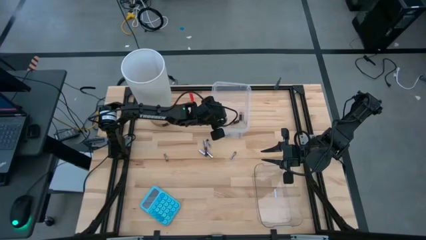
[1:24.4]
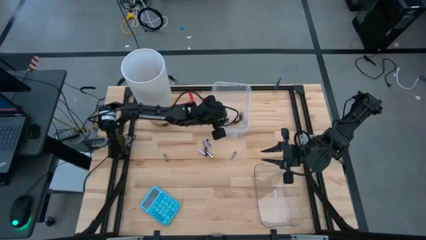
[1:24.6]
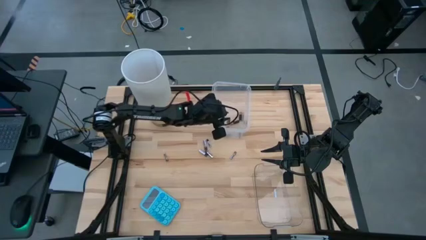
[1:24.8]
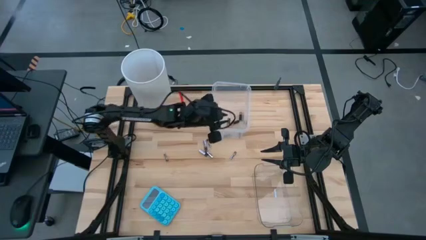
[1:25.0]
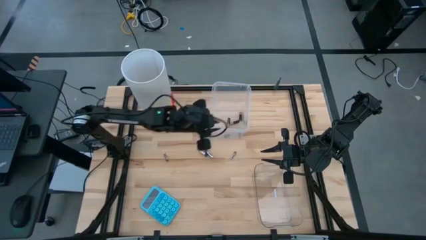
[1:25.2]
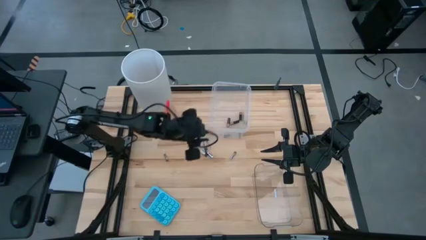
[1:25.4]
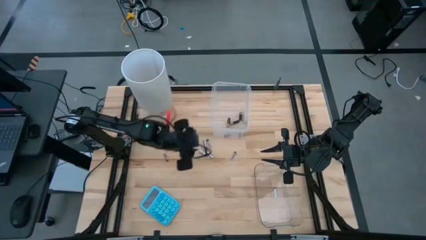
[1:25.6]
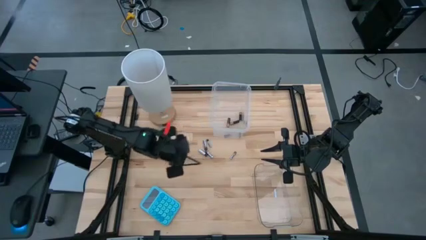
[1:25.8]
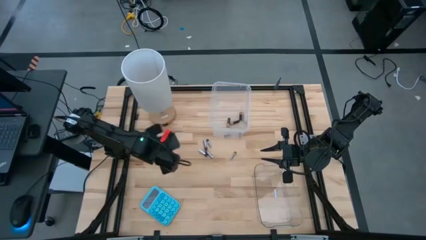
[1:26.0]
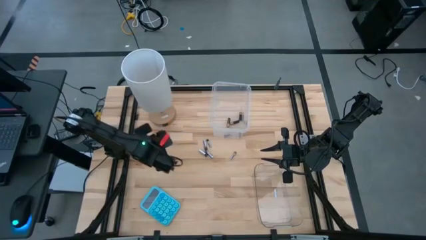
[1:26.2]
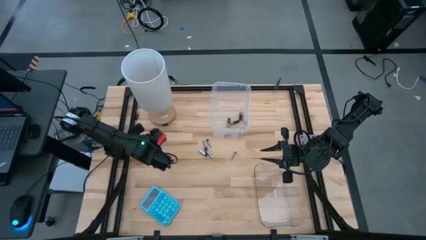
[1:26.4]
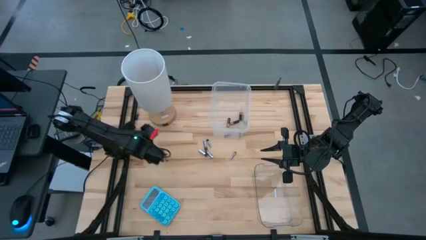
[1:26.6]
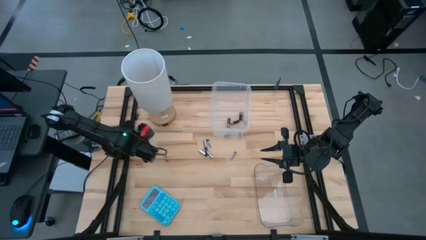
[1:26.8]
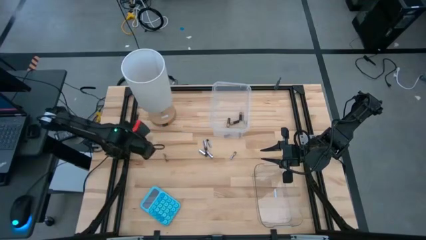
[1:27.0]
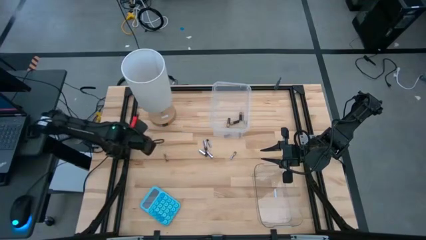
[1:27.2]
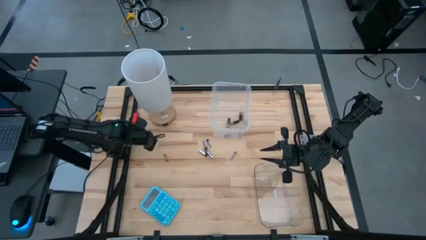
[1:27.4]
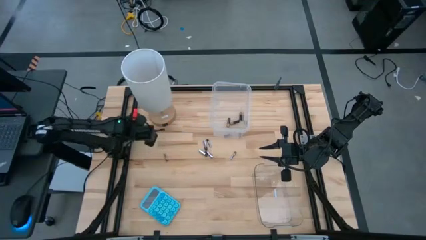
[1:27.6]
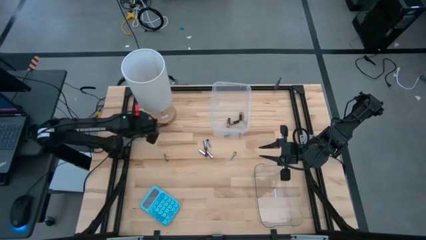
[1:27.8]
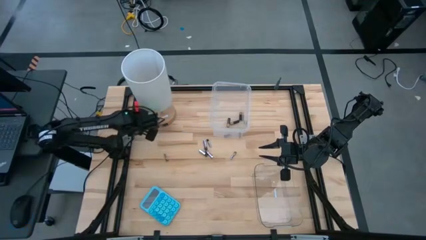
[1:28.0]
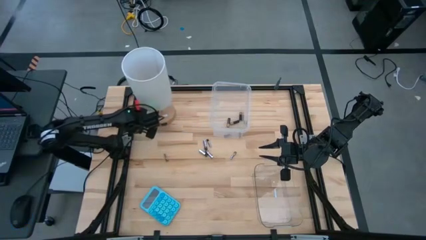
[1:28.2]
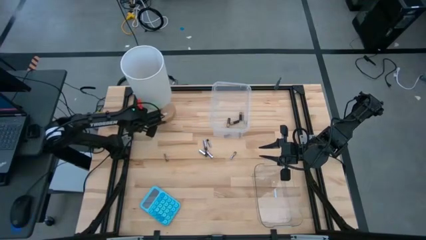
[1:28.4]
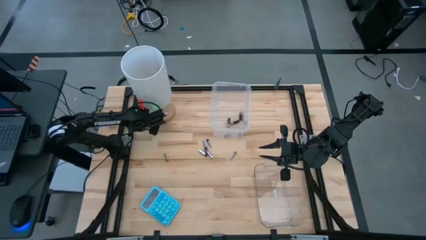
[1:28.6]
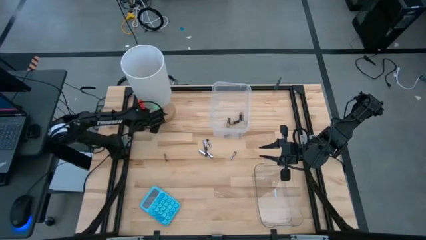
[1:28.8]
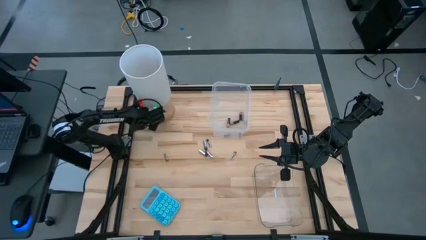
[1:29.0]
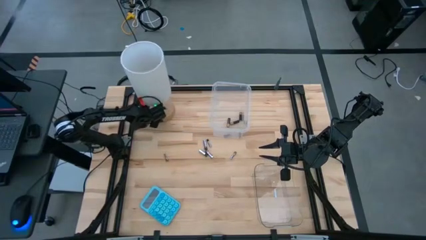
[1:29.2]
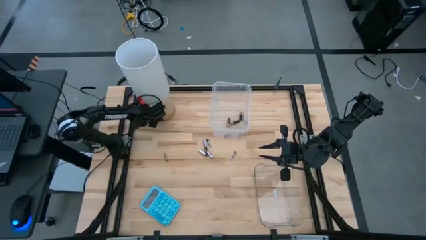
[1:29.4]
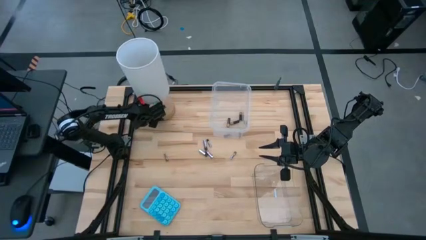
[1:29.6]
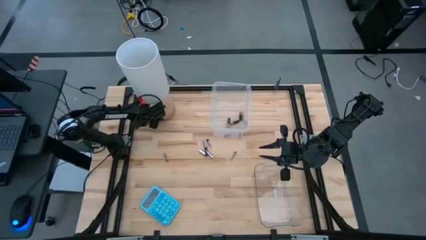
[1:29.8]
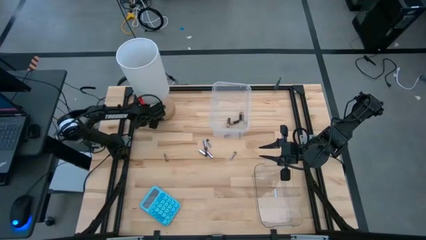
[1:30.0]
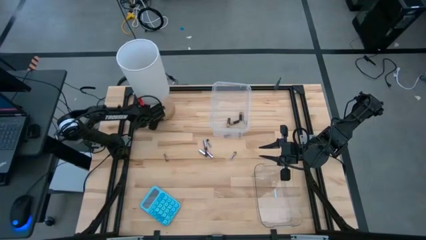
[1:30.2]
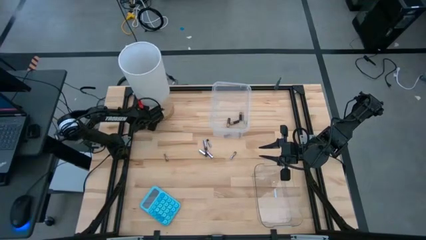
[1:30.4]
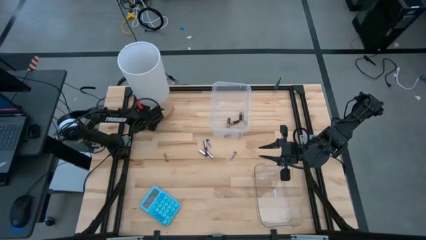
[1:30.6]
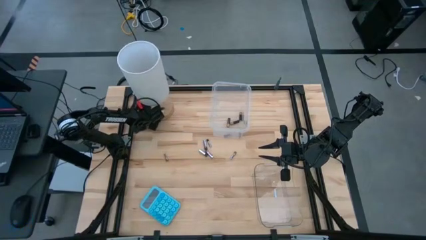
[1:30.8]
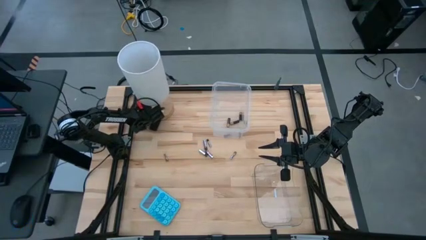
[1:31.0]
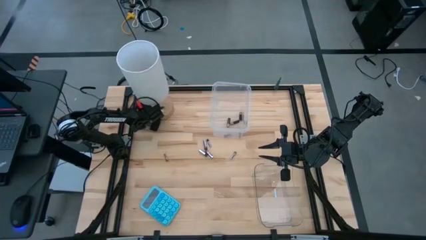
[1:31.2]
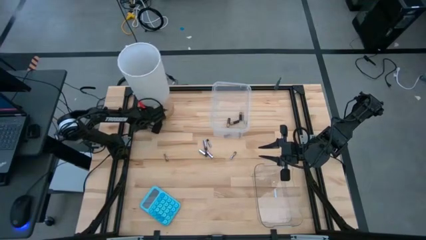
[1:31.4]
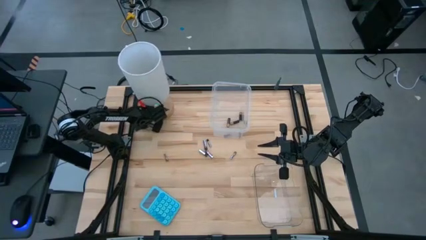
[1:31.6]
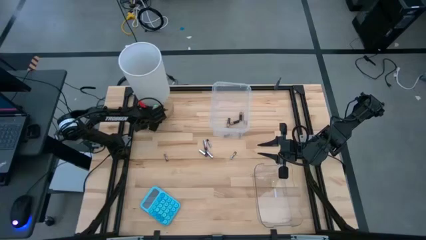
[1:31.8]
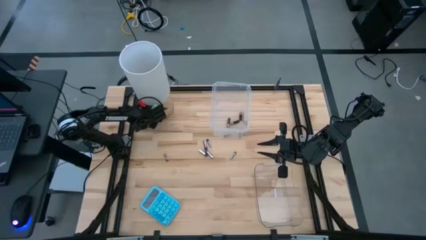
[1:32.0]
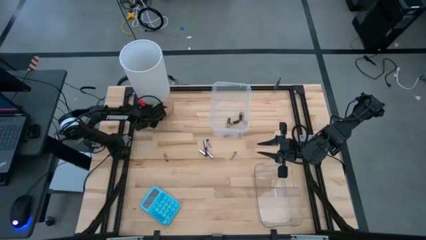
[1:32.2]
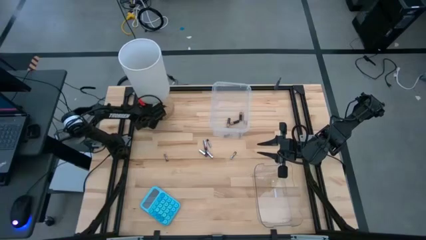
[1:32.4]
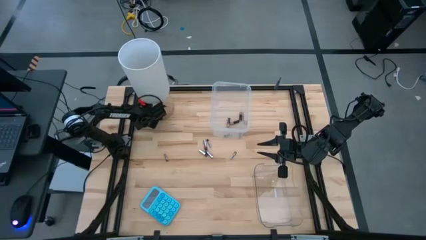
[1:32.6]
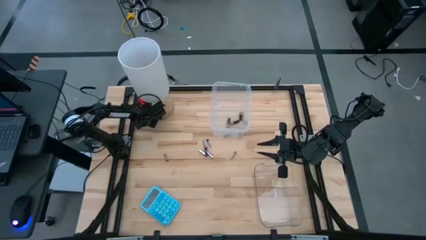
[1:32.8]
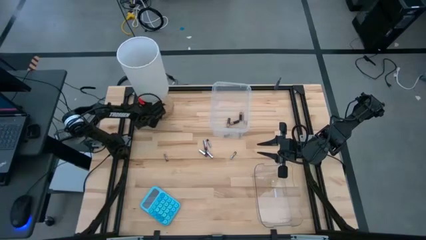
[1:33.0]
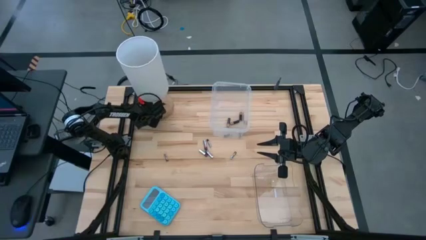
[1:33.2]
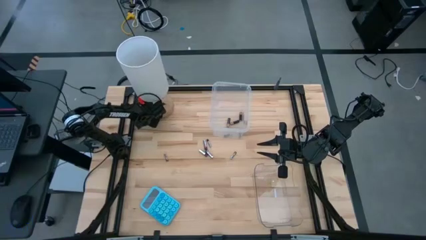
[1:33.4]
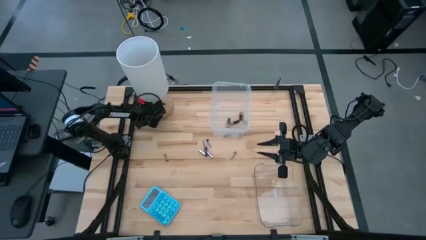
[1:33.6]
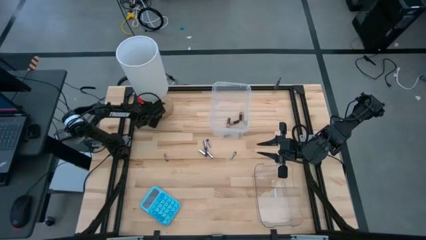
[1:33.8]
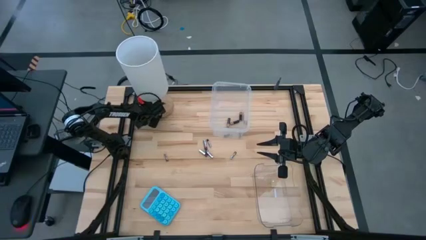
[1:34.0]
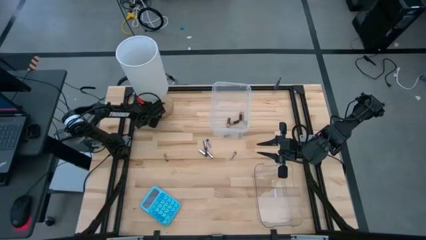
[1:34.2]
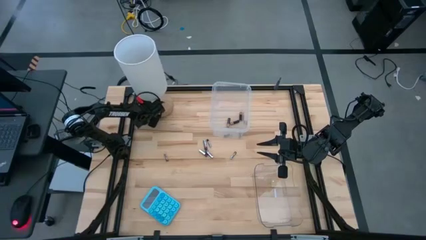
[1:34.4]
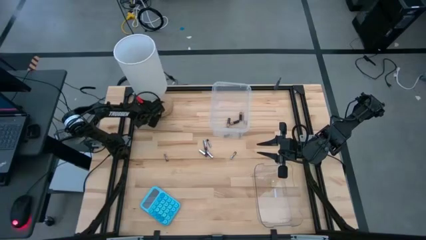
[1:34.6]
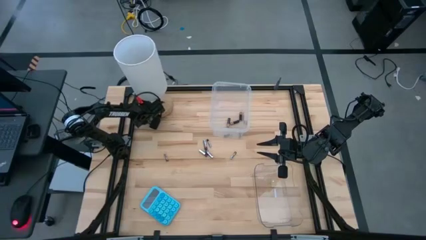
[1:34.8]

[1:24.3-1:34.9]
Task: Sort batteries
Put the brown battery into the top transparent bin

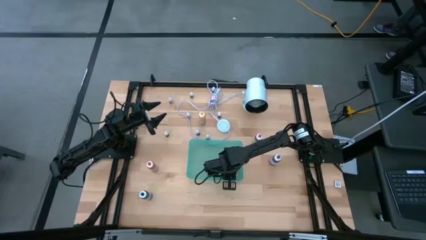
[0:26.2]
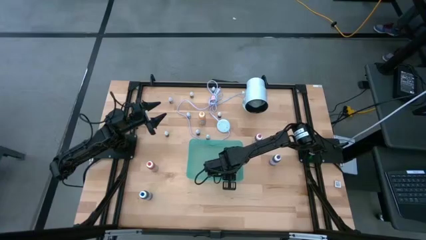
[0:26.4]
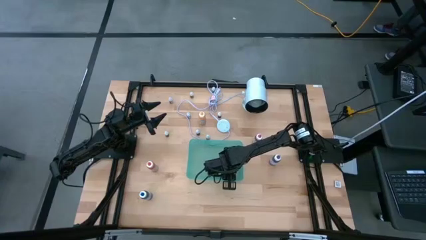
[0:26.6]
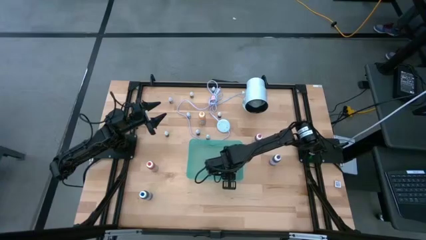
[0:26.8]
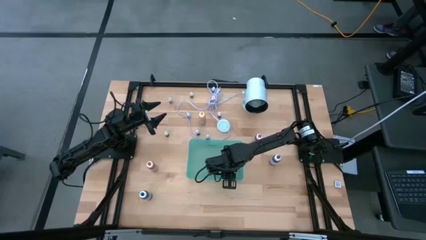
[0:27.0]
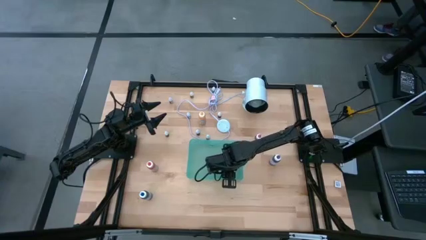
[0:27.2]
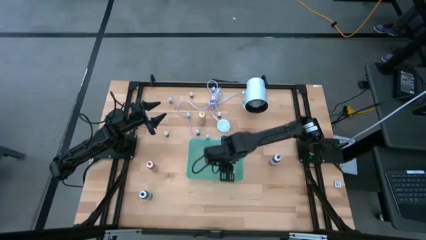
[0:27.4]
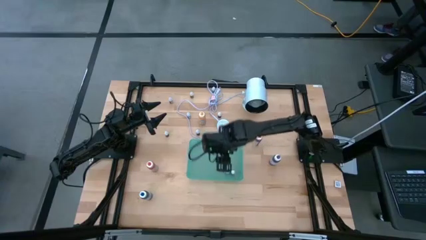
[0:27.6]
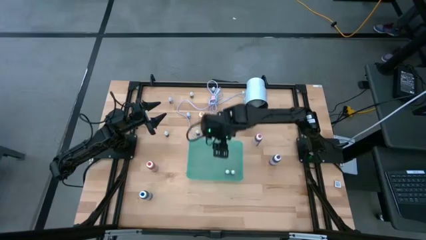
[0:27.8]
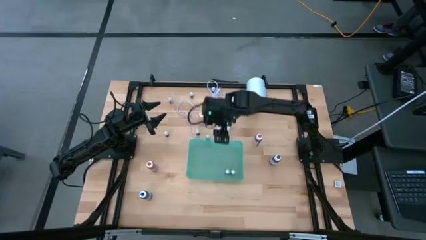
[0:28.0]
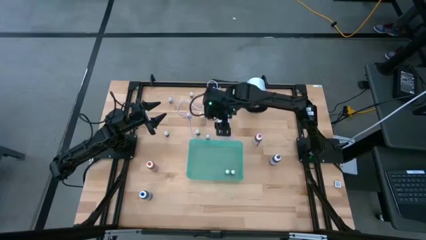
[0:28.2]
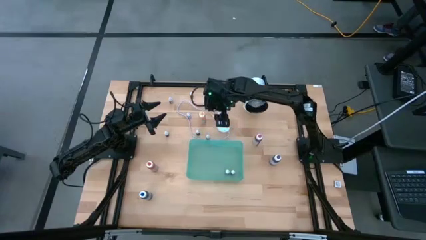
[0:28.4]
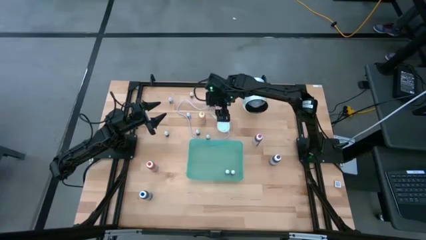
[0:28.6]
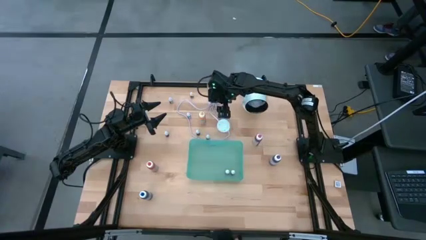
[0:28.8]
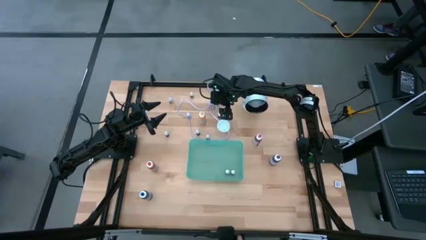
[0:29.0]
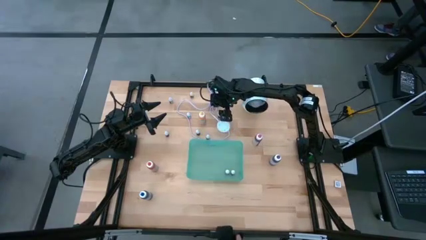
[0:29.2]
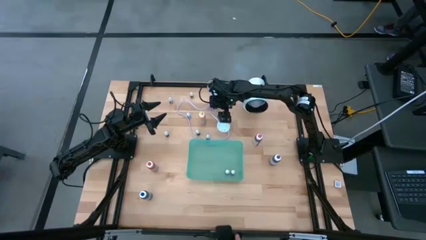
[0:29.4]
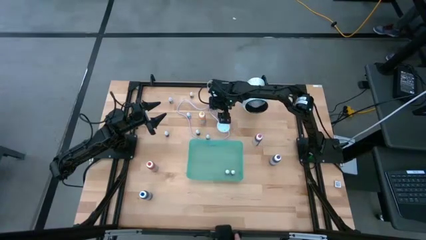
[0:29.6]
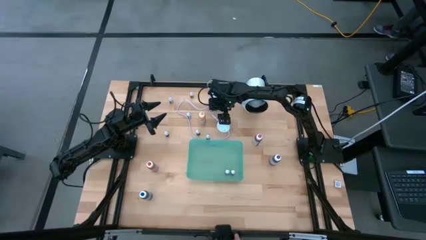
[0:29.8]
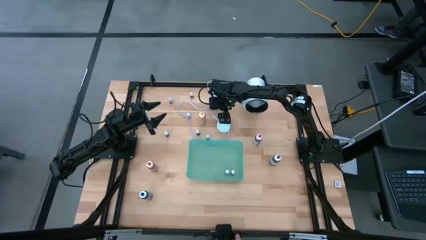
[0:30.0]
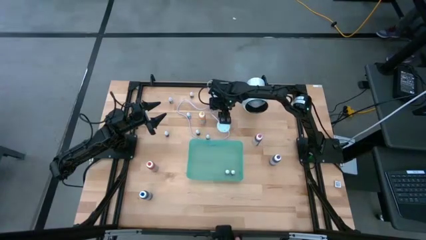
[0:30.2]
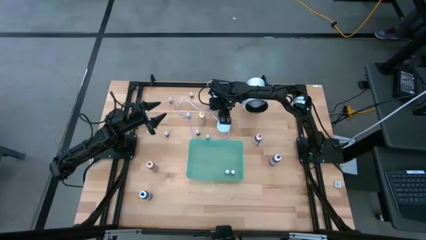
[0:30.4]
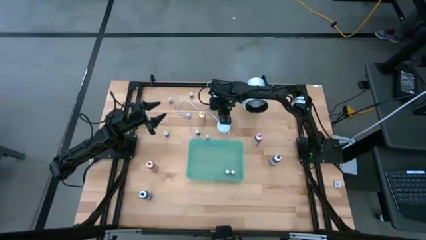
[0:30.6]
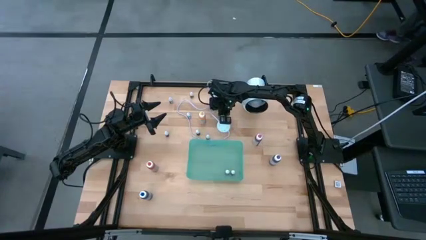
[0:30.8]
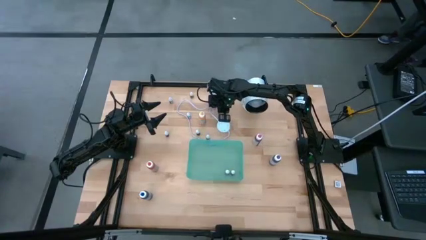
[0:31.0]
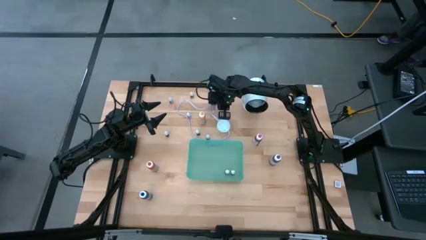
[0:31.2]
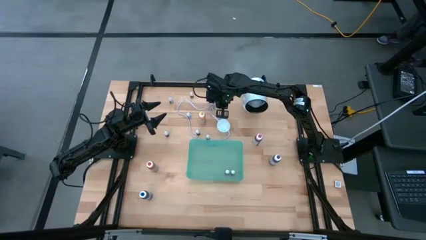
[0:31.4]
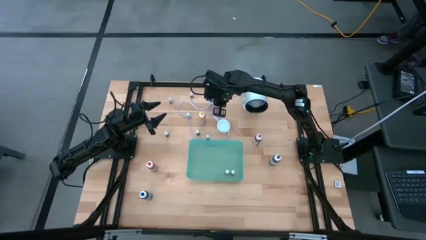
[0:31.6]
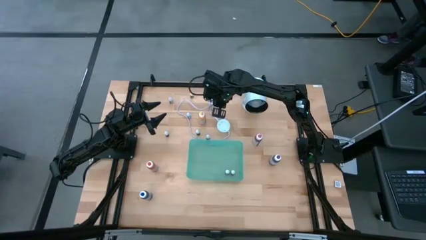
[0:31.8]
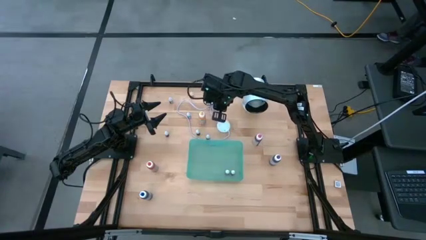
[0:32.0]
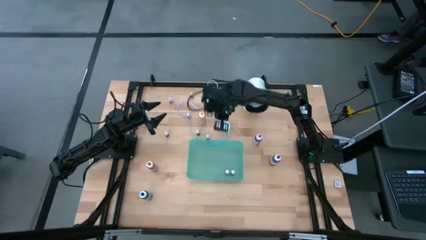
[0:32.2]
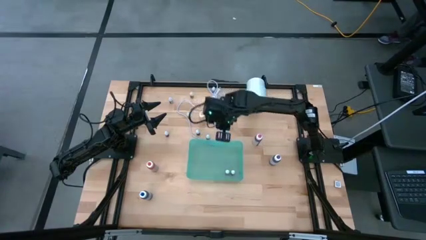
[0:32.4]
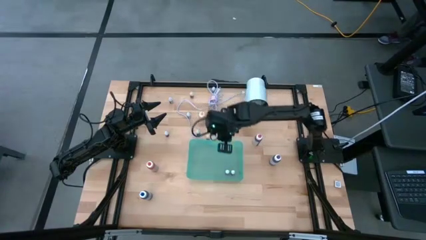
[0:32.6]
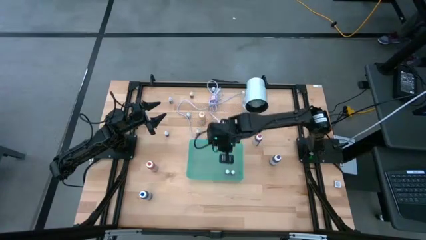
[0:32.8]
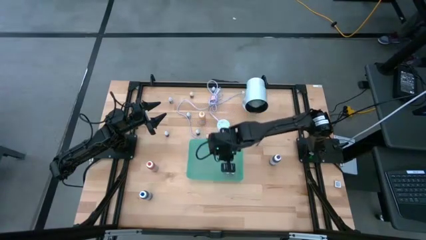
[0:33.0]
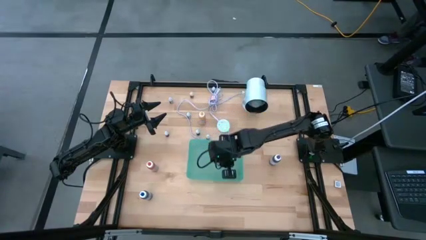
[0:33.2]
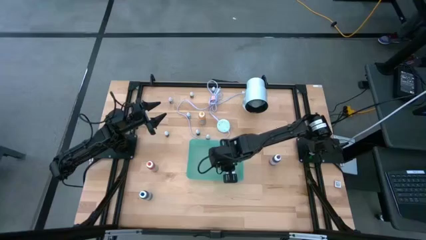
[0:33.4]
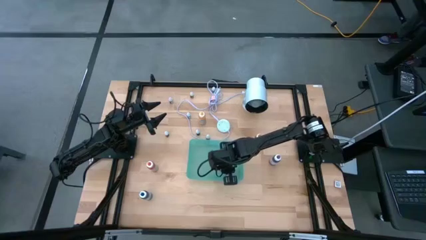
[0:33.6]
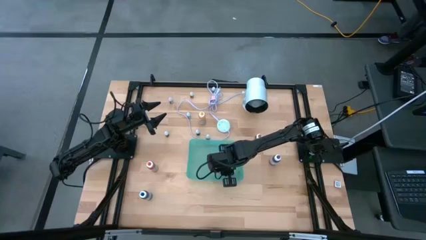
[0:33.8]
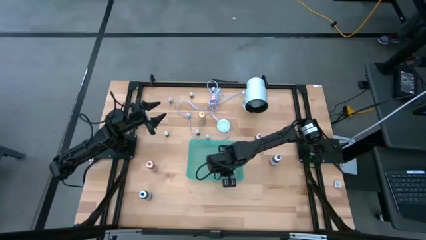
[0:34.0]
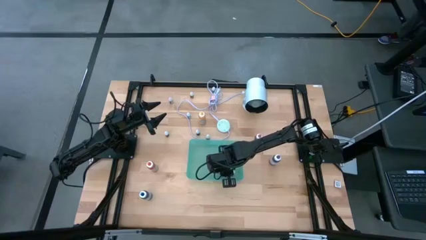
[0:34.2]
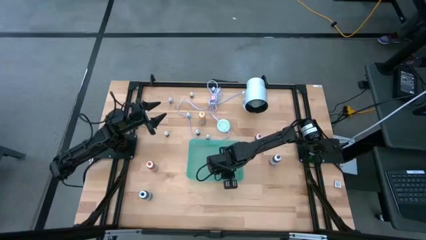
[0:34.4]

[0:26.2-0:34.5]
Task: Pick & Place food coloring
Put the middle small green food coloring bottle into the bin
